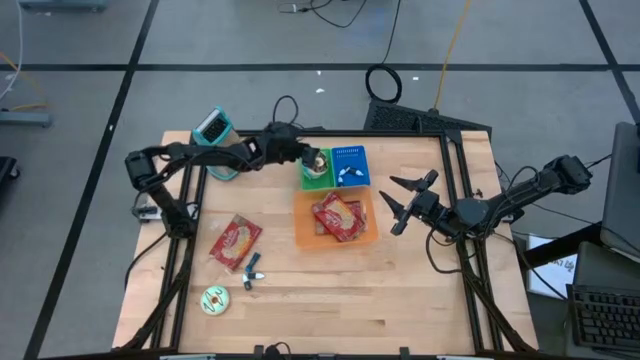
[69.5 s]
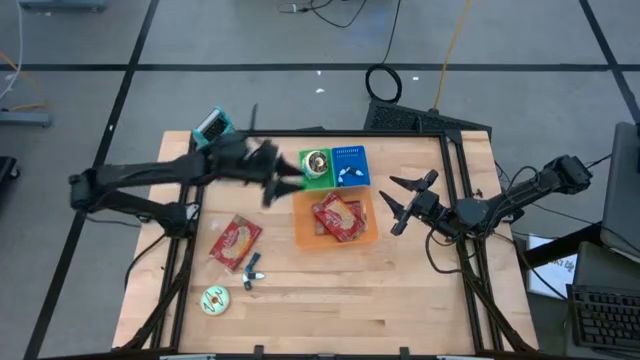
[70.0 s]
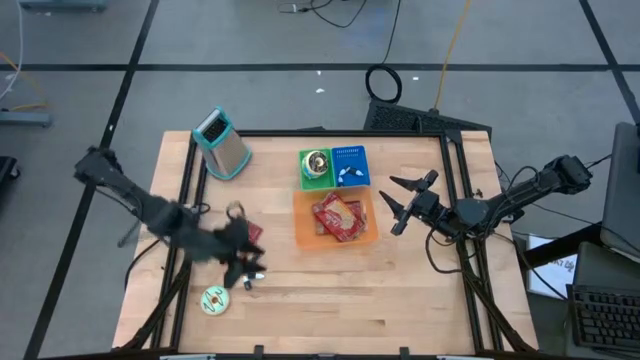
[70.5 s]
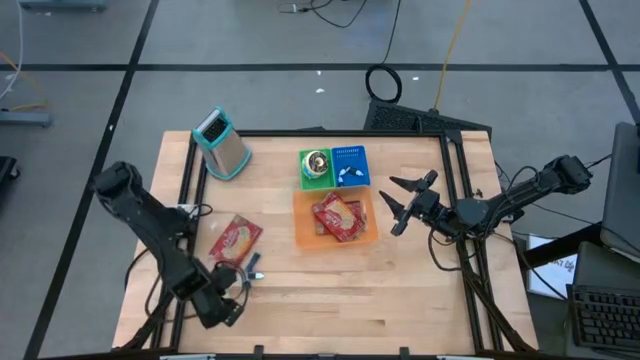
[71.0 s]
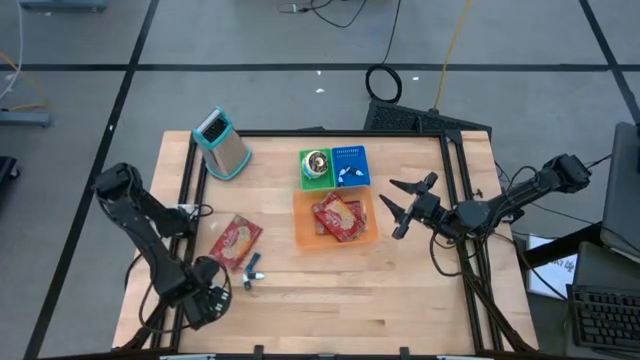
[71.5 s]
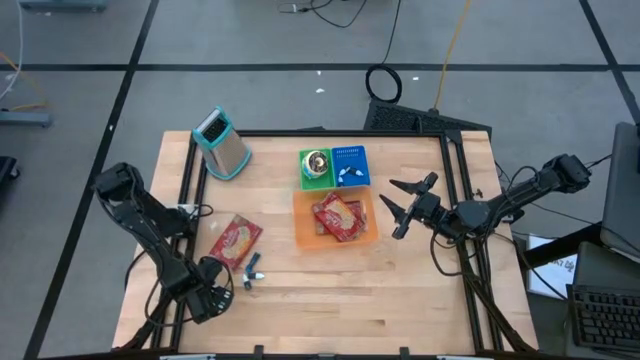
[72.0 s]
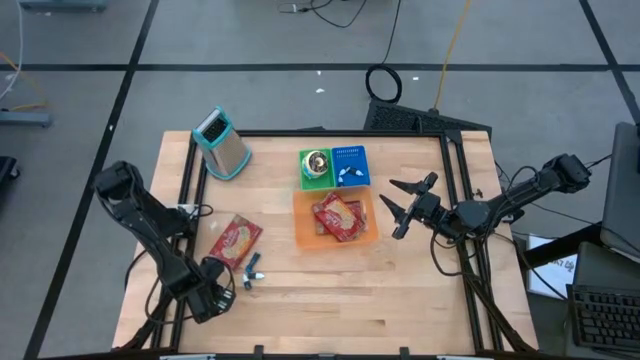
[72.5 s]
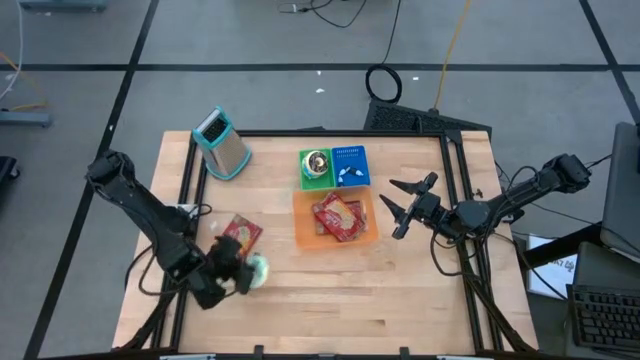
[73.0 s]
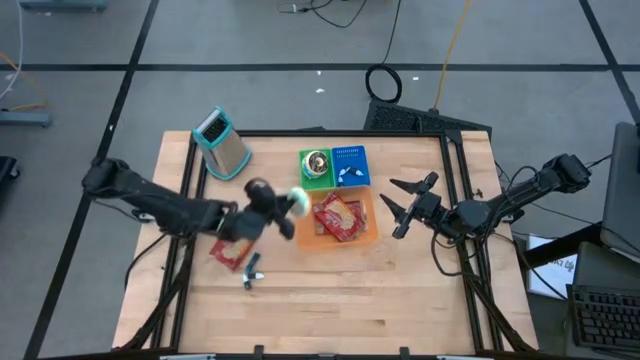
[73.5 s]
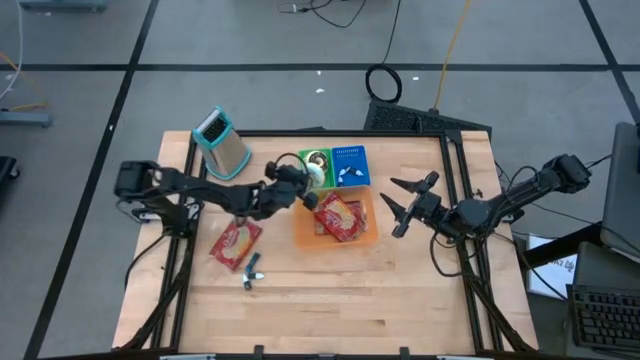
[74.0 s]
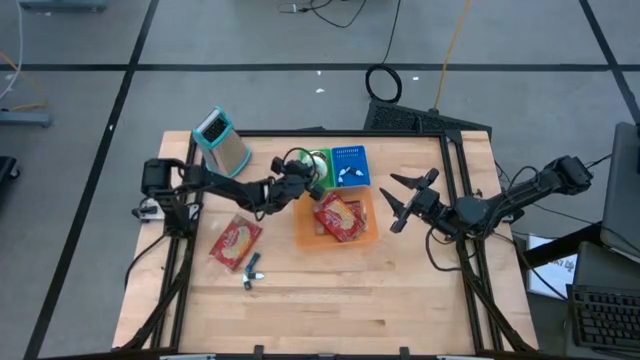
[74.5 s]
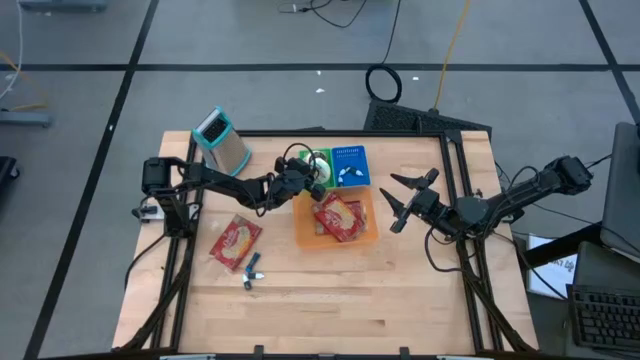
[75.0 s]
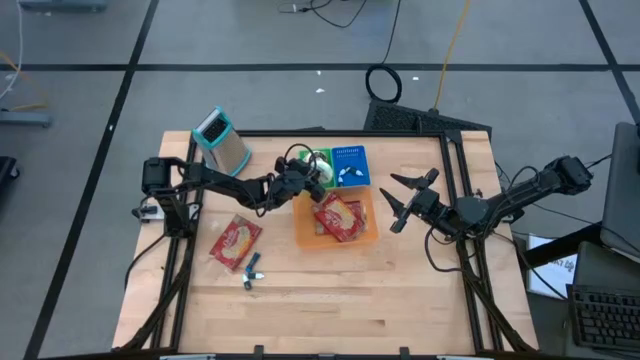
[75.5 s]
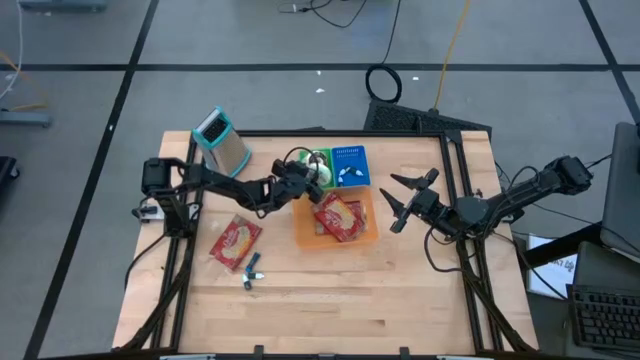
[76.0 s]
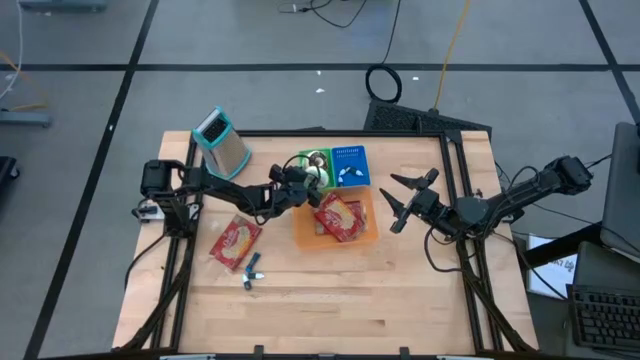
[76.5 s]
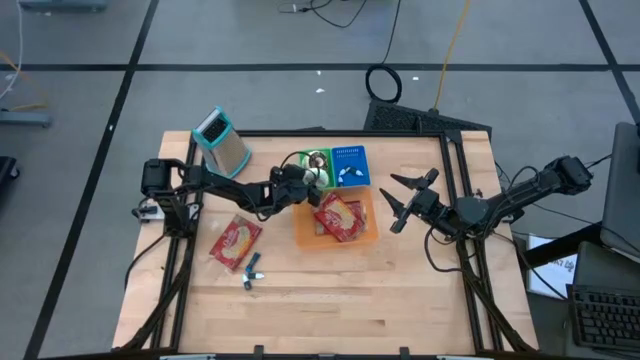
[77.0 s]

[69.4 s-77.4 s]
Put the green doughnut into the green bin

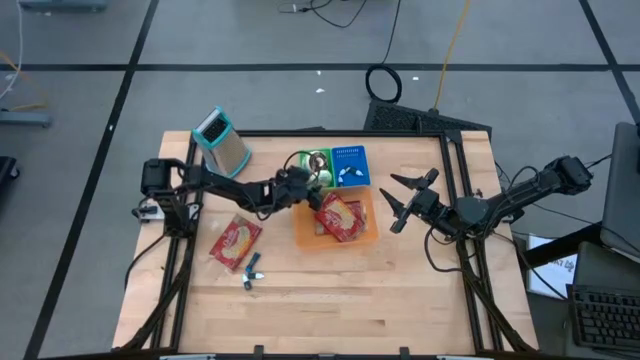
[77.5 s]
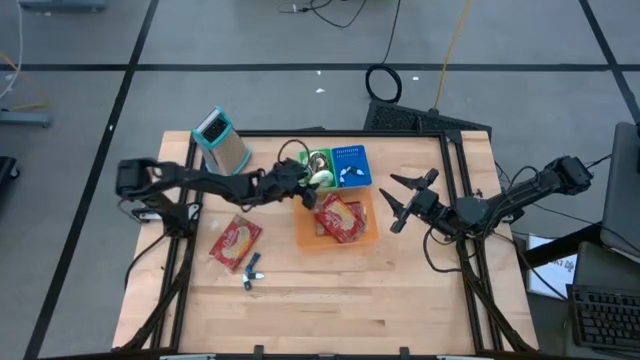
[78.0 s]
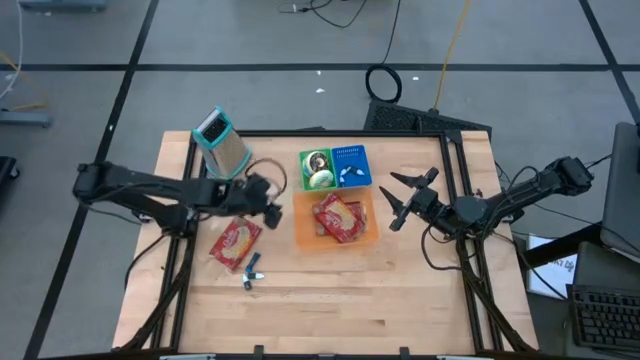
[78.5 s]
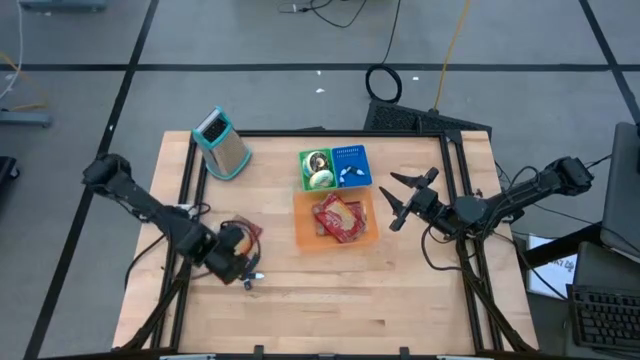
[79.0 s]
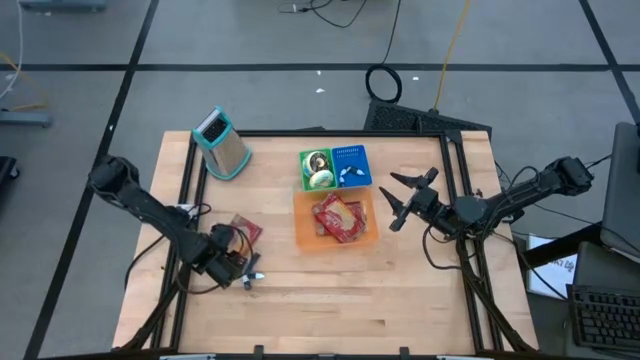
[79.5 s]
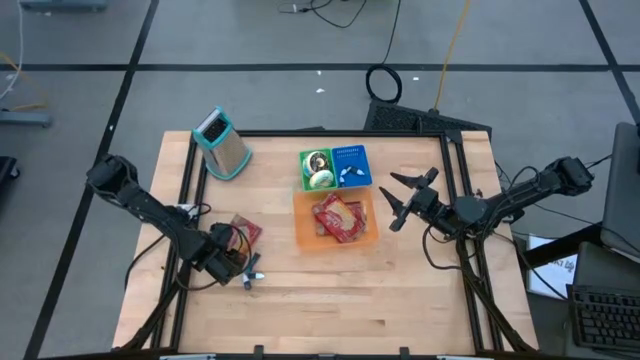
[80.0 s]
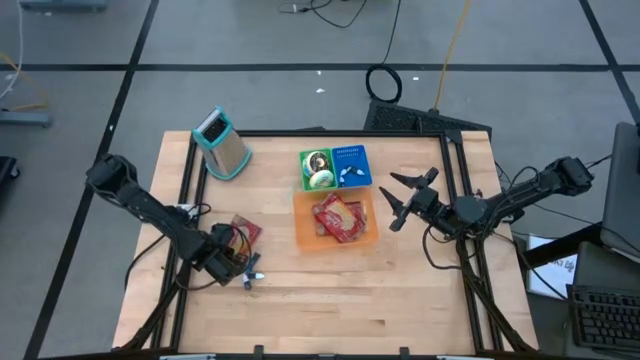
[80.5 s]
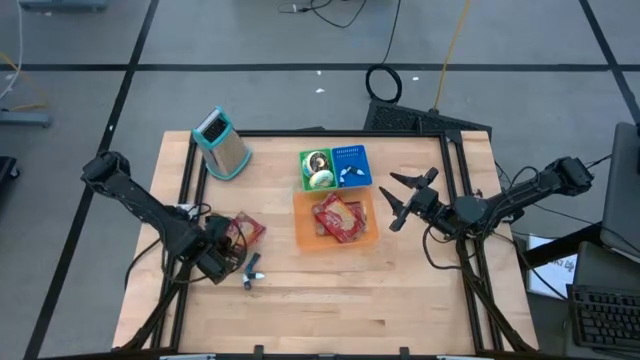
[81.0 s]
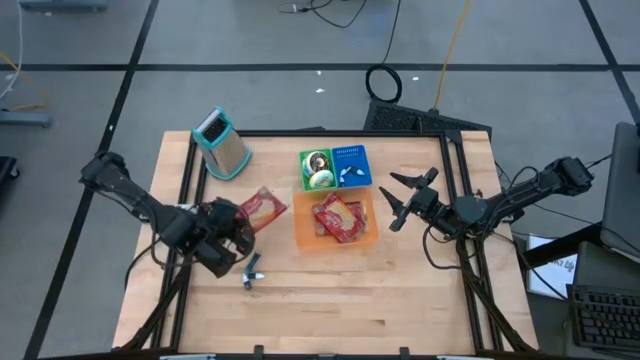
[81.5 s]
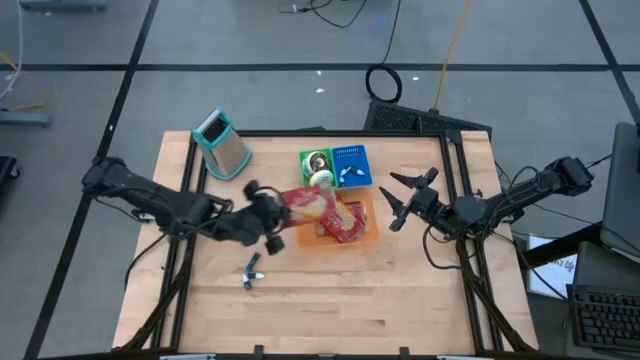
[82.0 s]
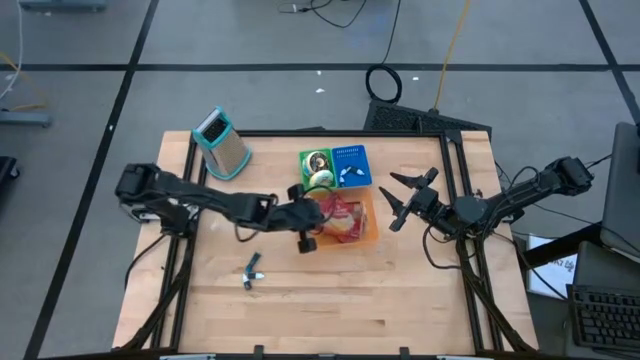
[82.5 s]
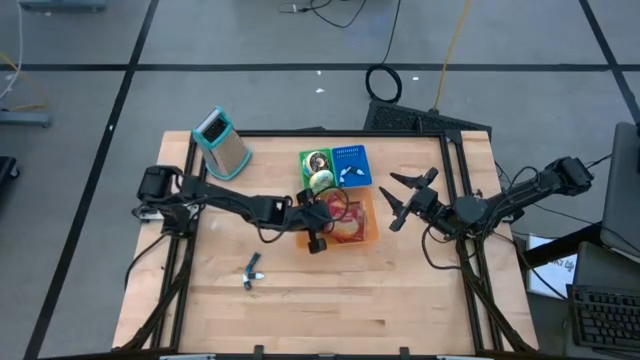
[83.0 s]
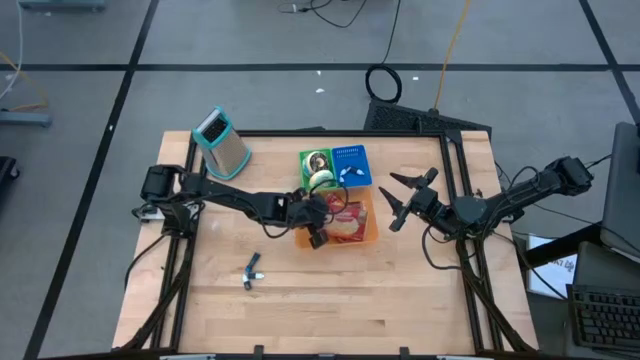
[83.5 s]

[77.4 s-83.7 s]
Put the red popcorn bag into the orange bin

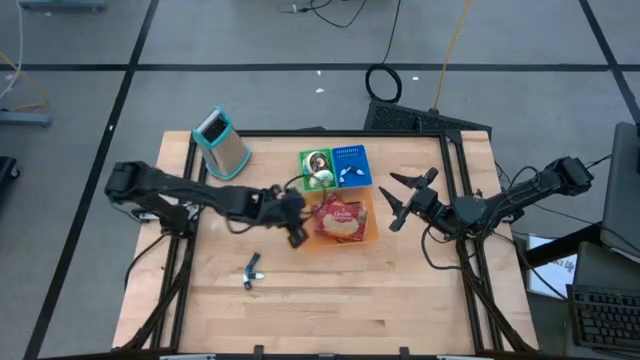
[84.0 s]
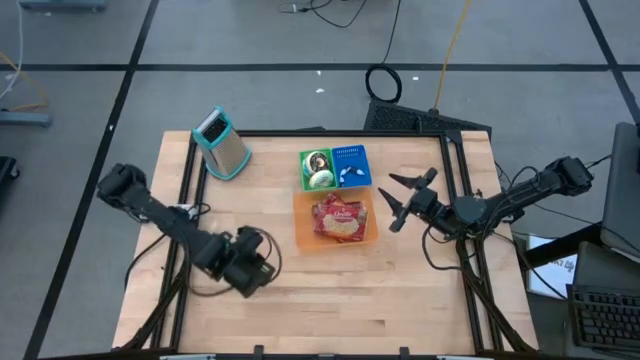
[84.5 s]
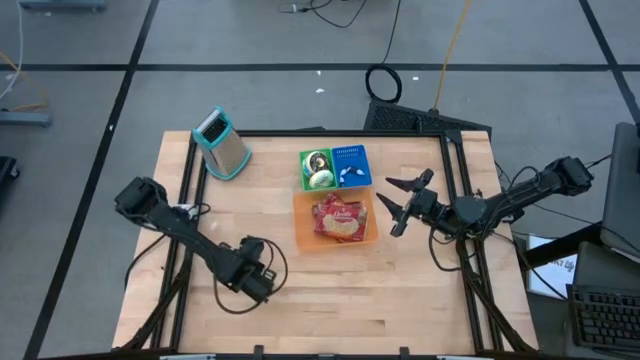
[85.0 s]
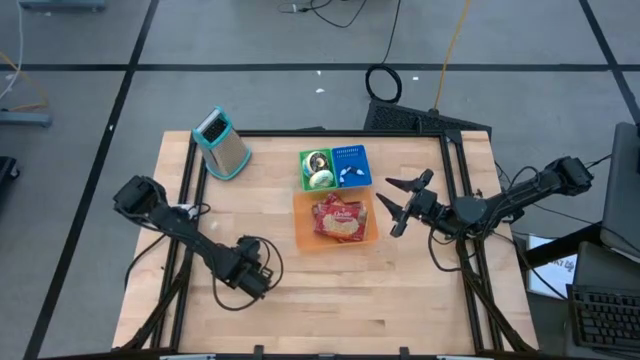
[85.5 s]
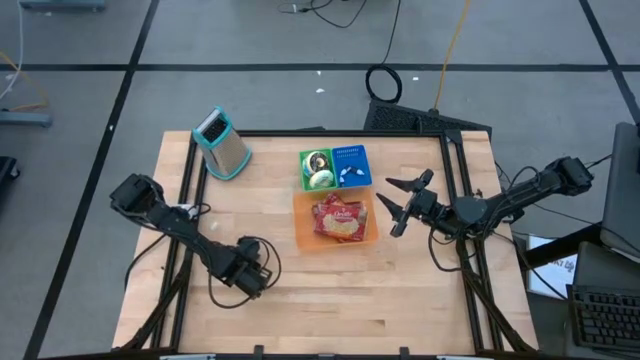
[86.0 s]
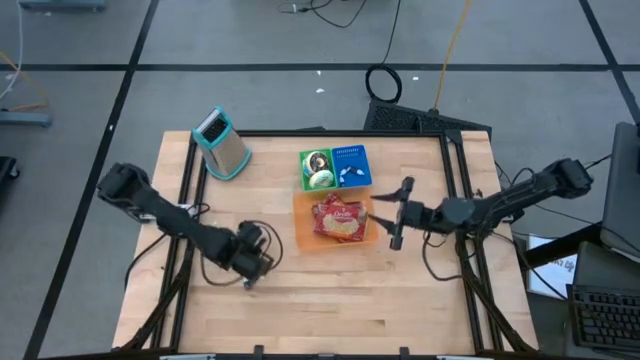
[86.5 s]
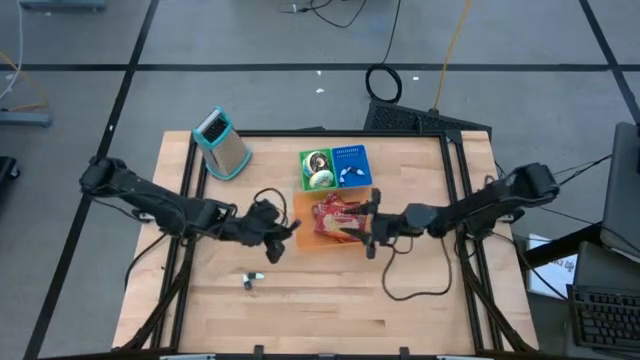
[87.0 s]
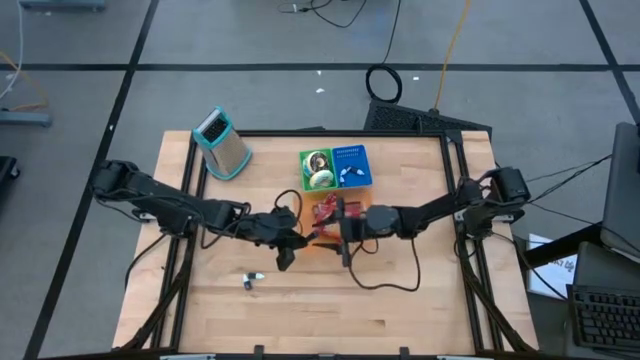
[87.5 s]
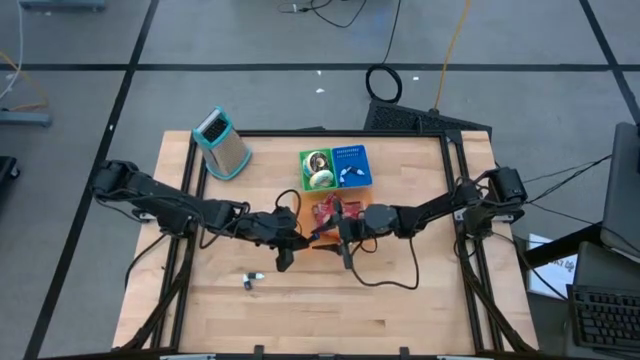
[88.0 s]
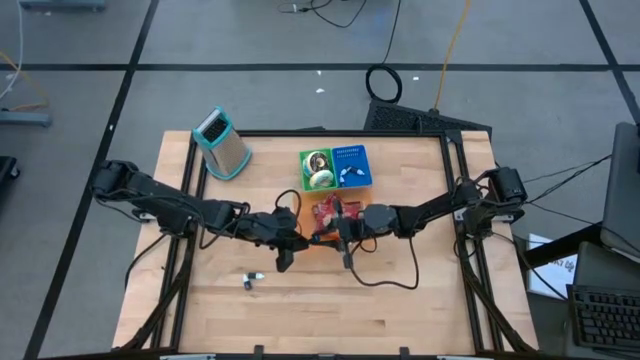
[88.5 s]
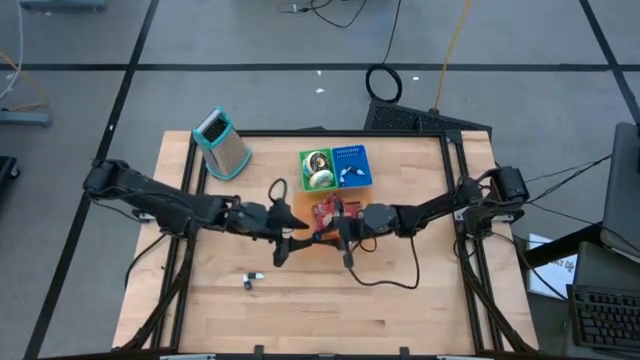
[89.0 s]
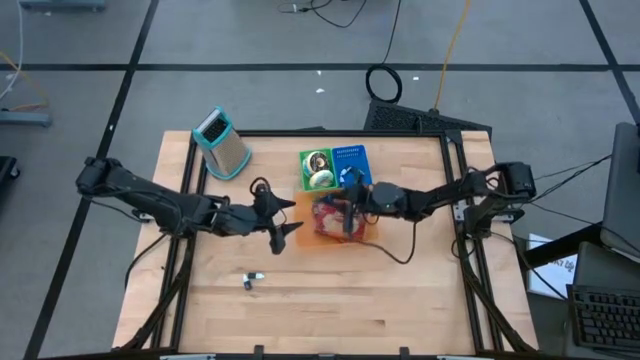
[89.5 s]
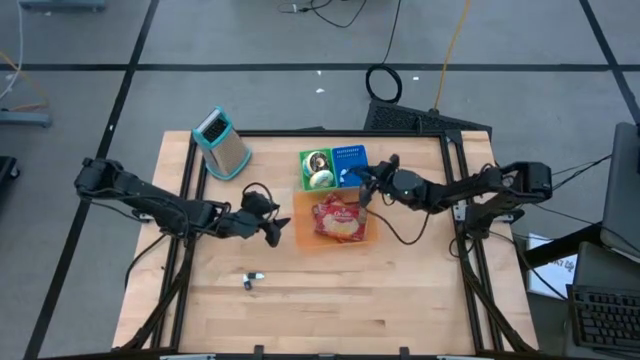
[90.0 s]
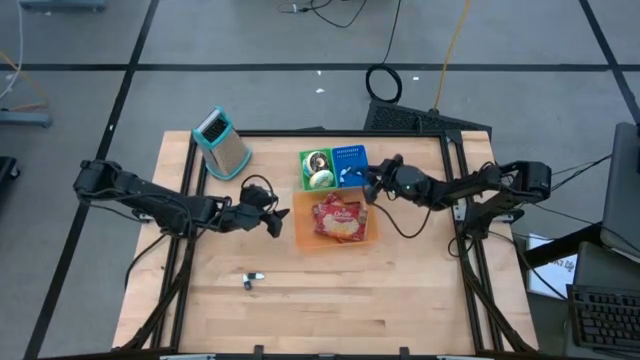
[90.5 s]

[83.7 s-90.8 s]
Put the blue food coloring bottle into the blue bin
